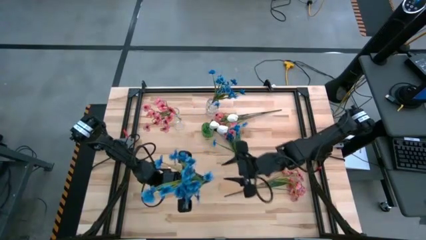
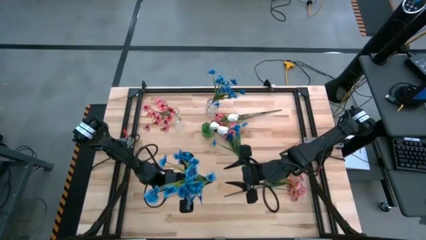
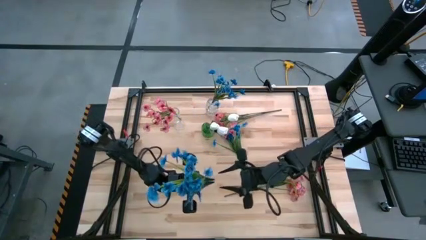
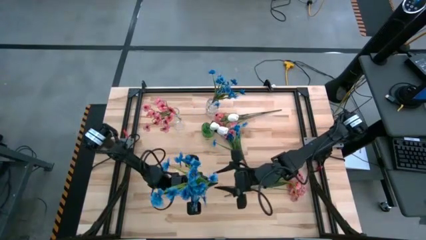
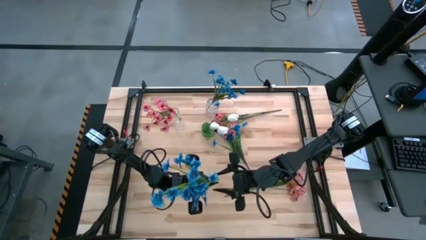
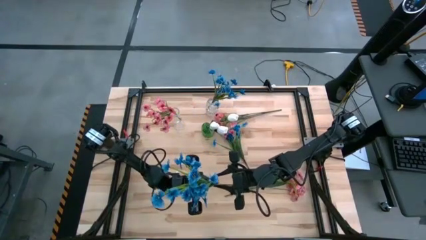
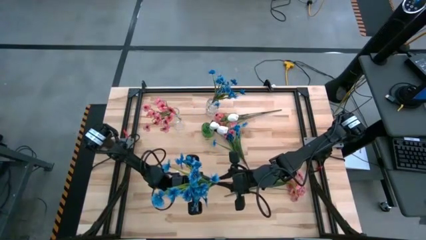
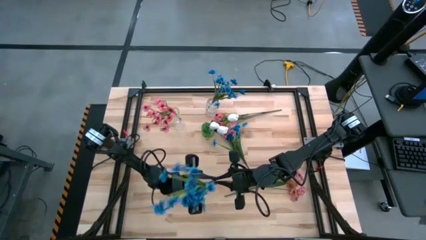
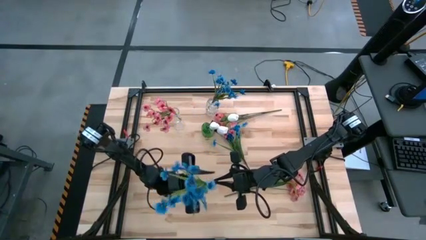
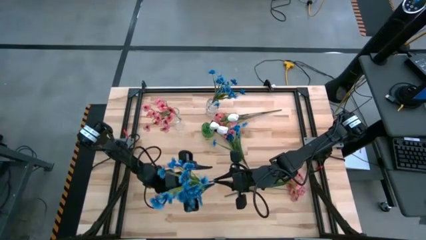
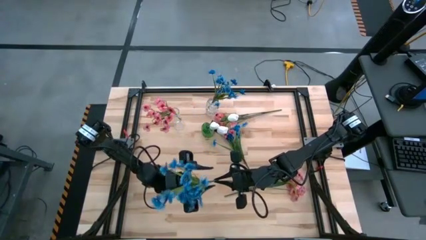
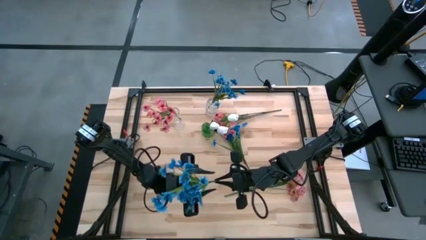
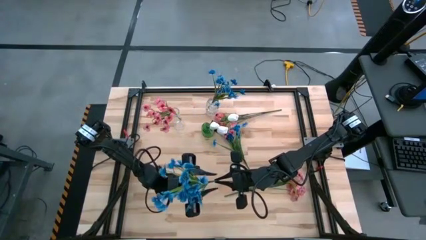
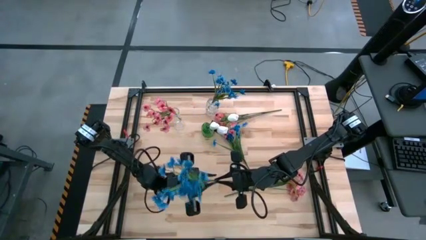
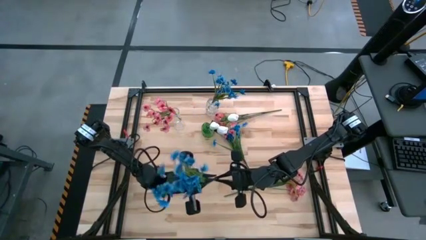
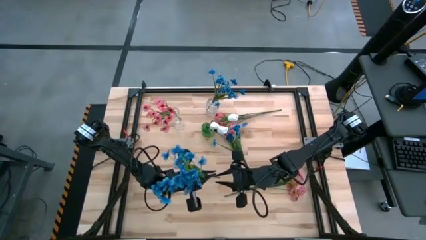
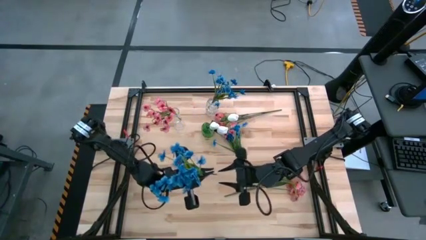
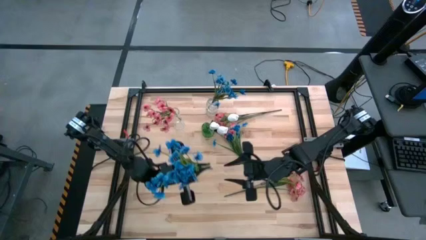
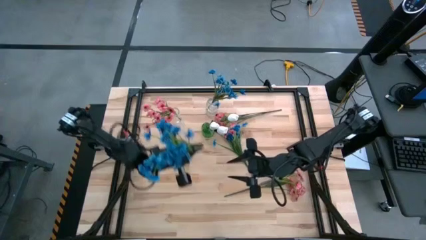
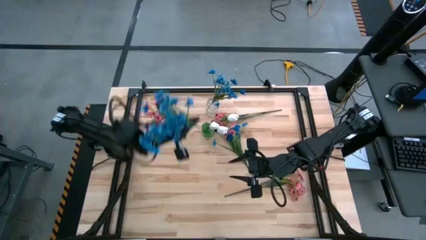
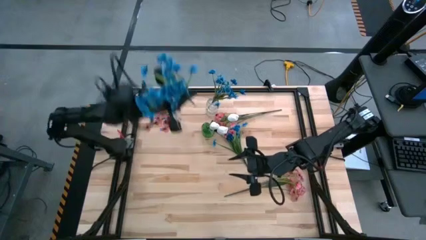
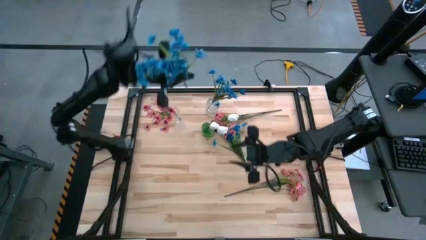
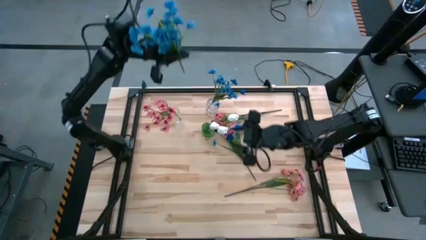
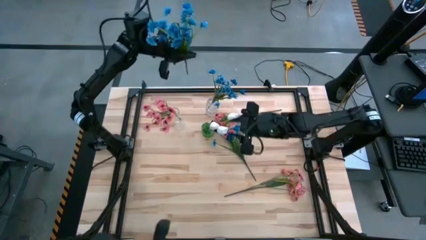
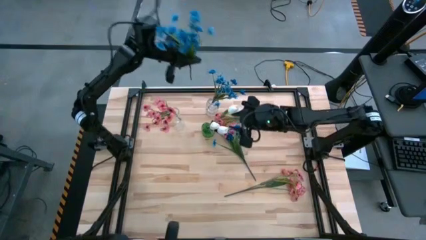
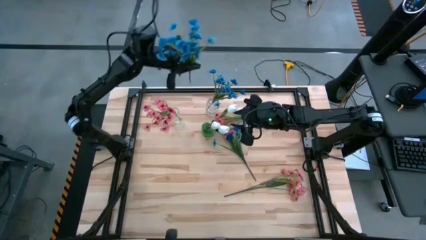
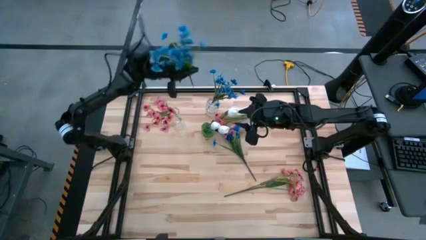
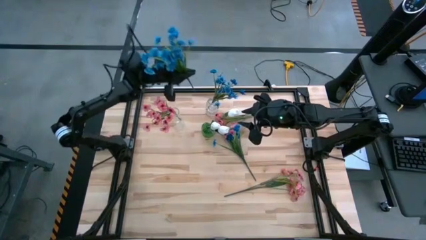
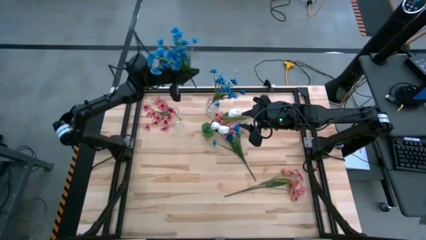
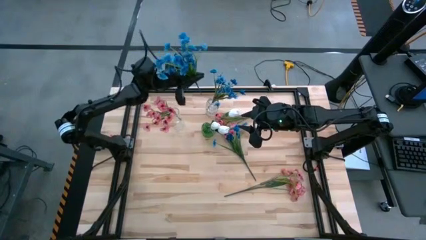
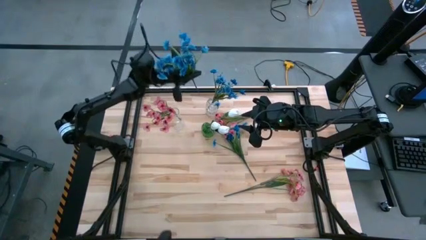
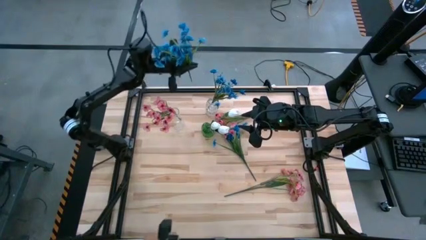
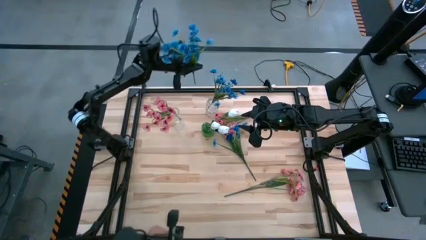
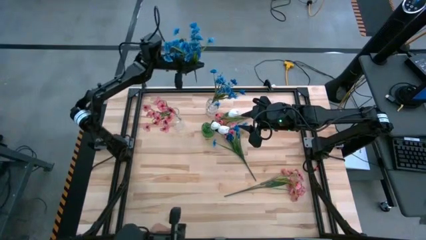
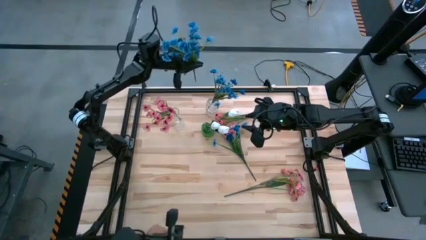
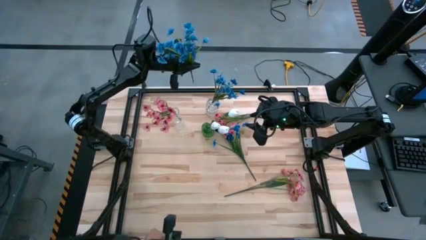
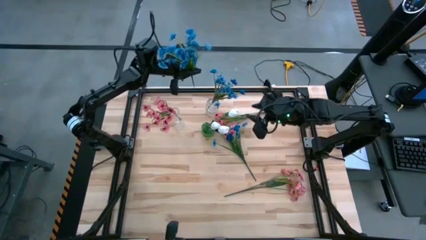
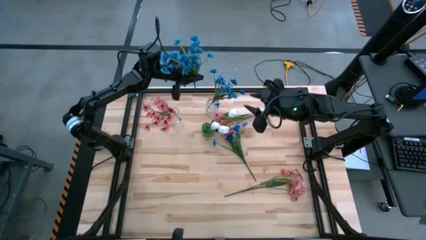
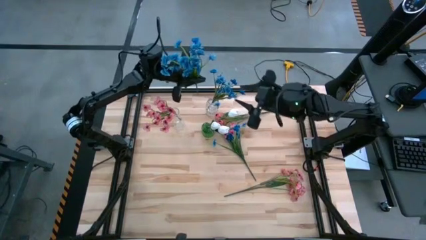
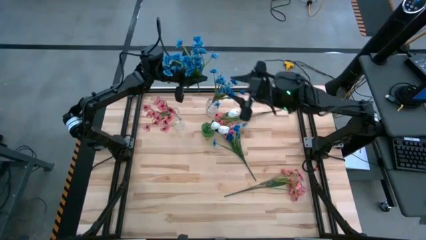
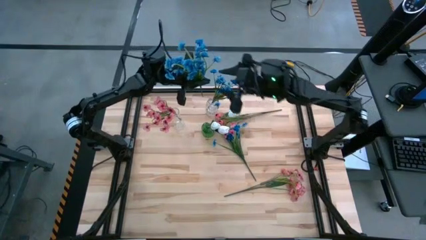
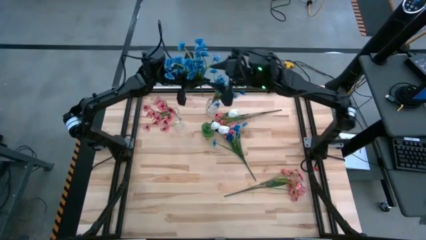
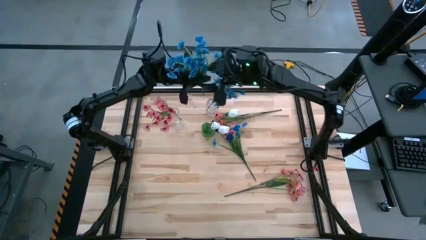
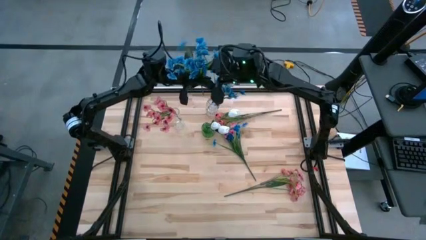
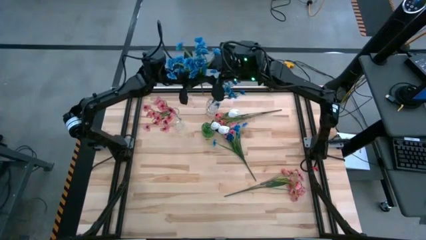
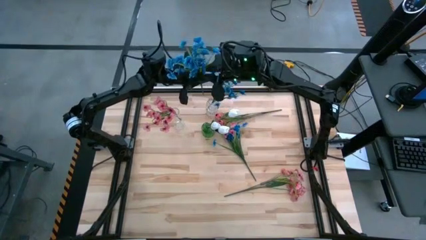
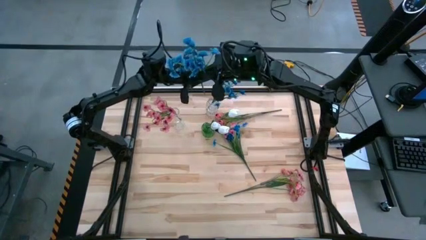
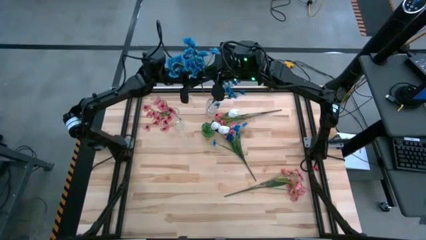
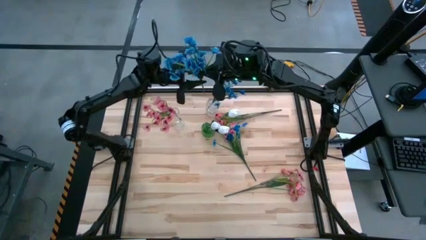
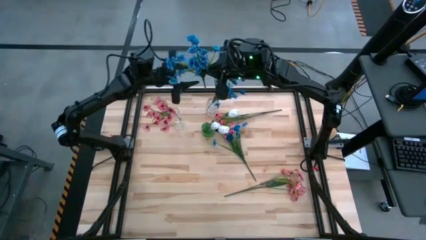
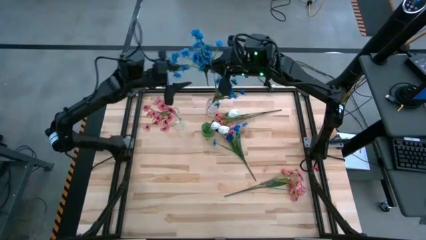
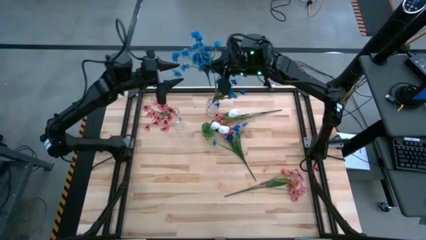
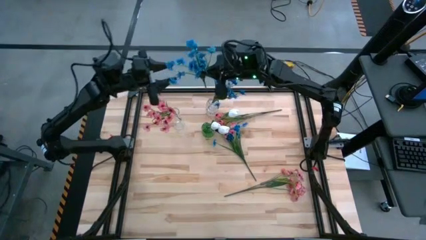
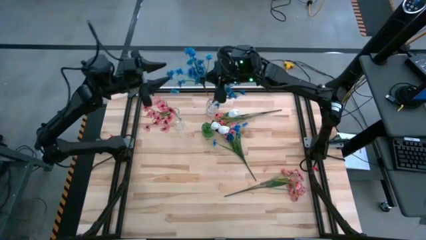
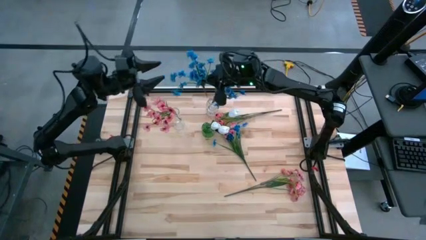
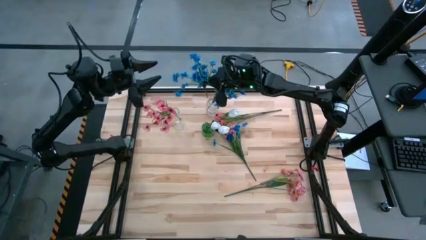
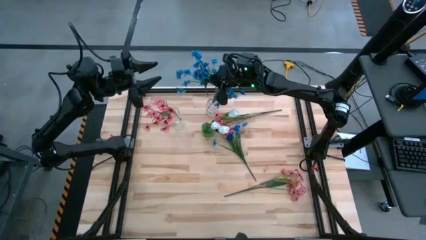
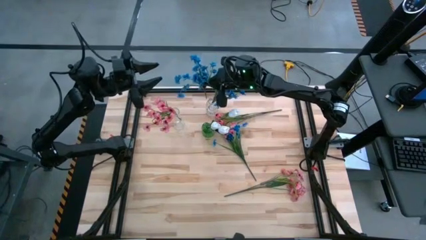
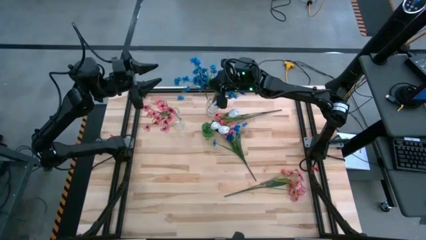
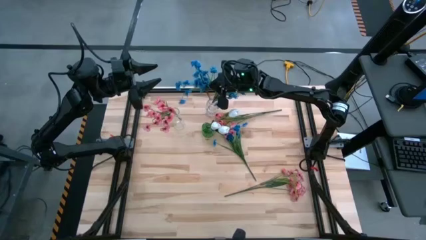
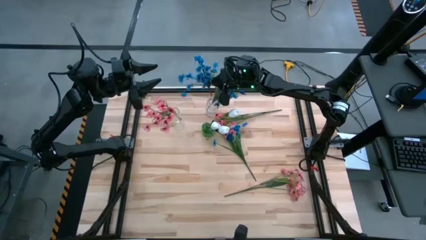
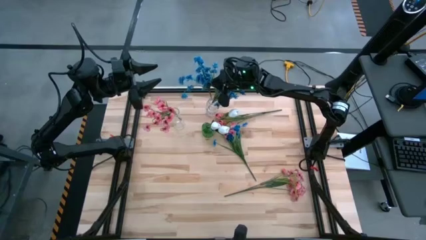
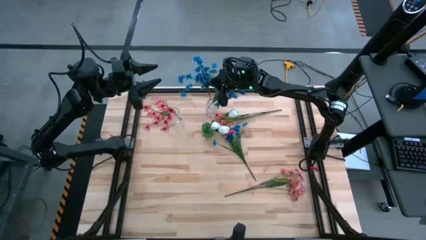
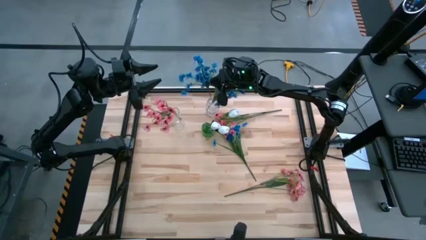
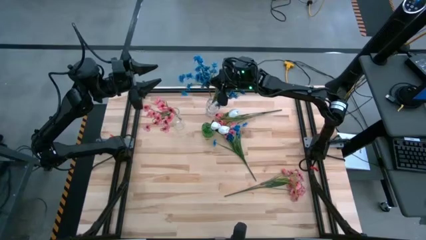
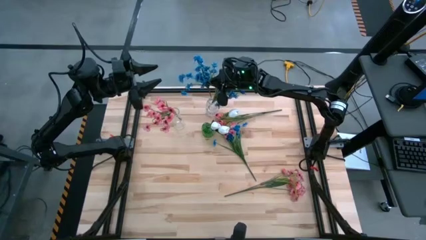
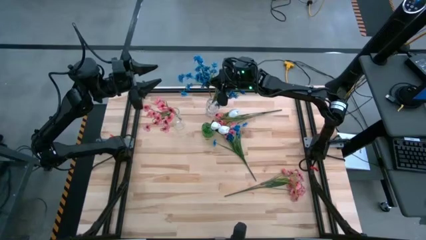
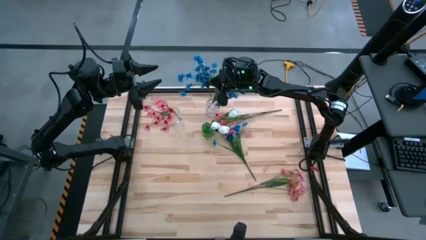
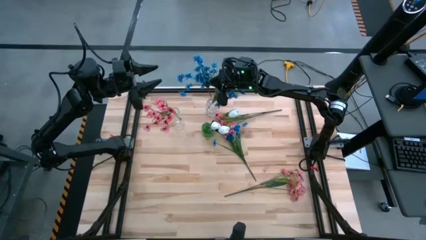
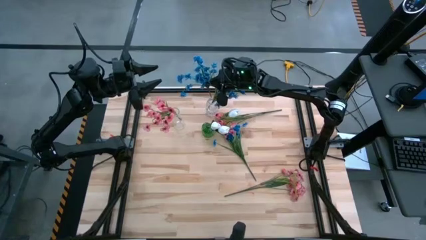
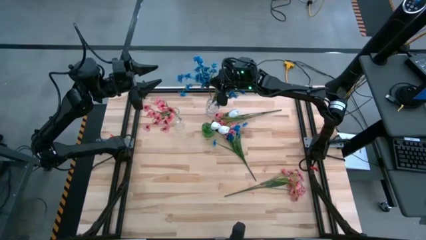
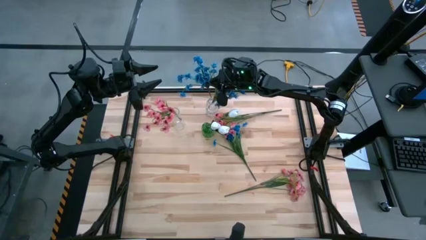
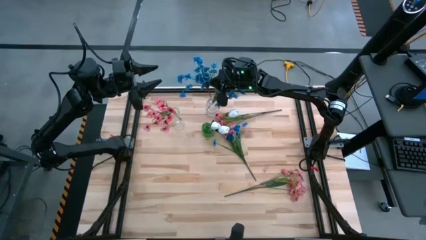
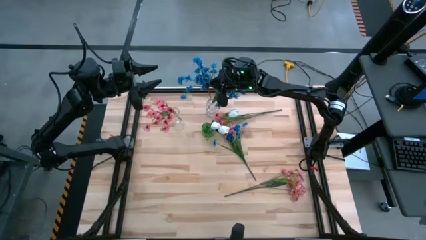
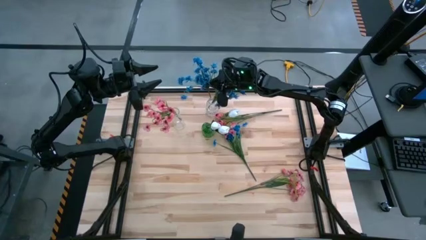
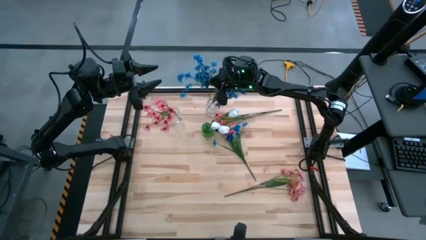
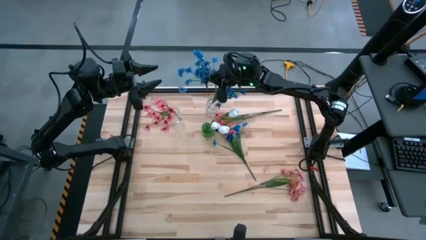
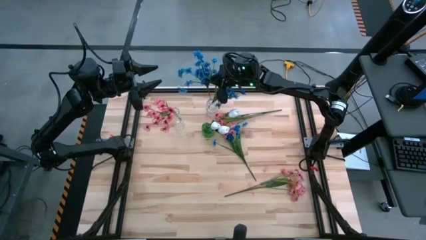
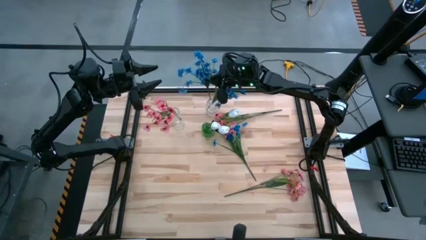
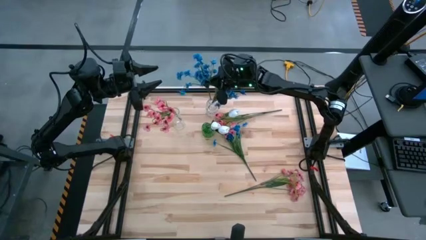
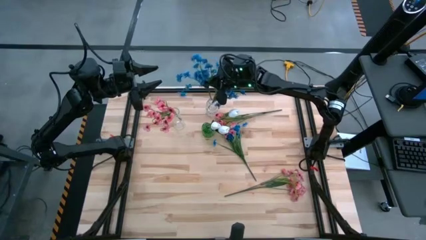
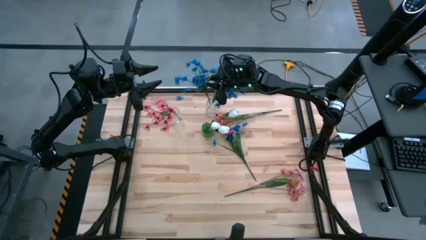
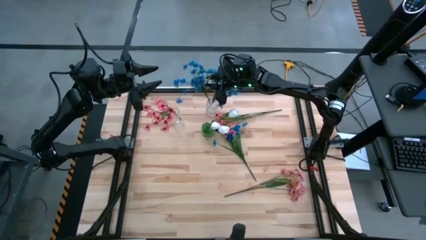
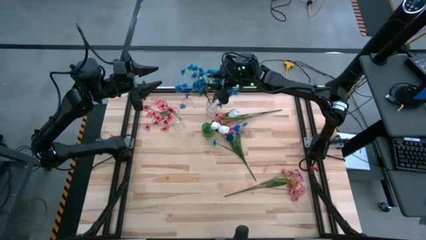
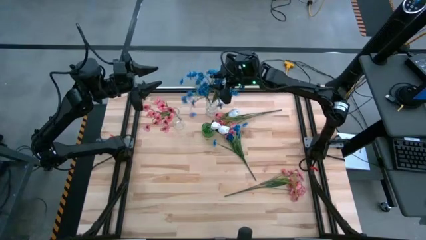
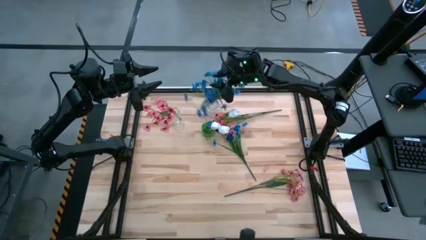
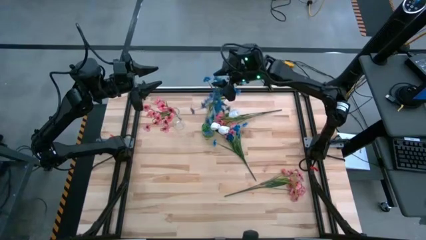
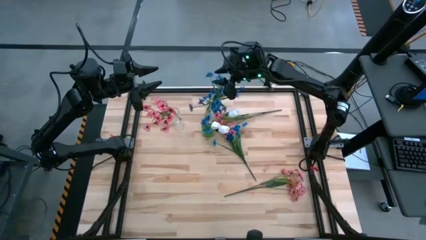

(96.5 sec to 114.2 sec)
Task: Sort flowers into vase by color
Put the right blue flowers into the right transparent vase
